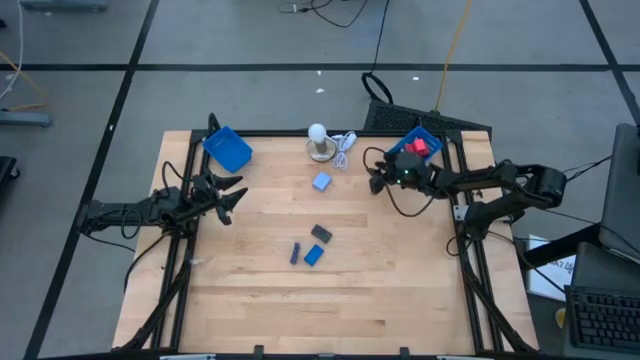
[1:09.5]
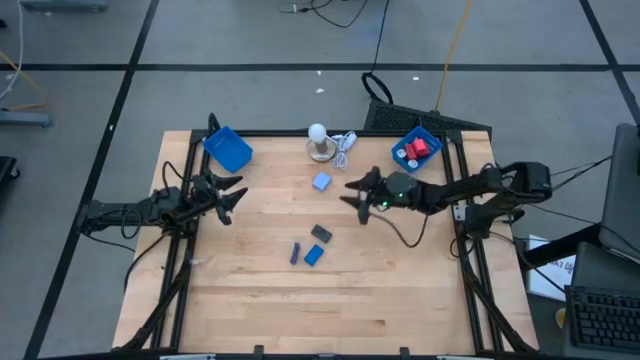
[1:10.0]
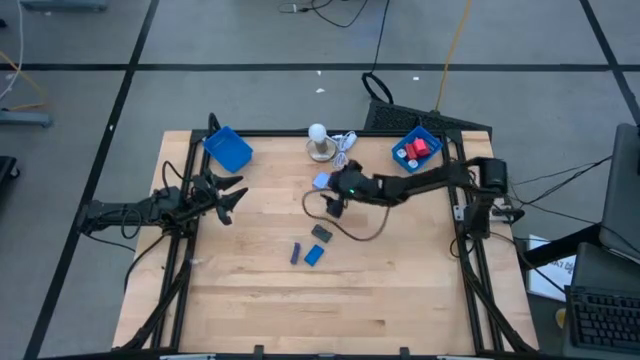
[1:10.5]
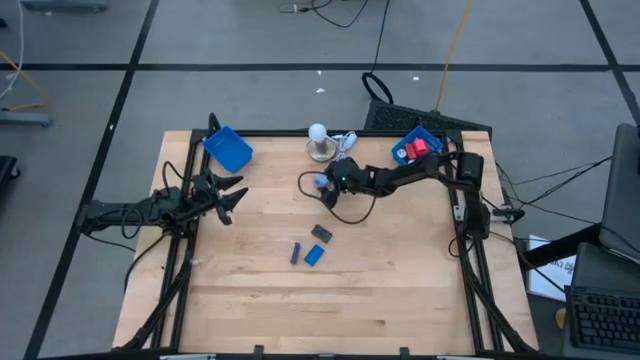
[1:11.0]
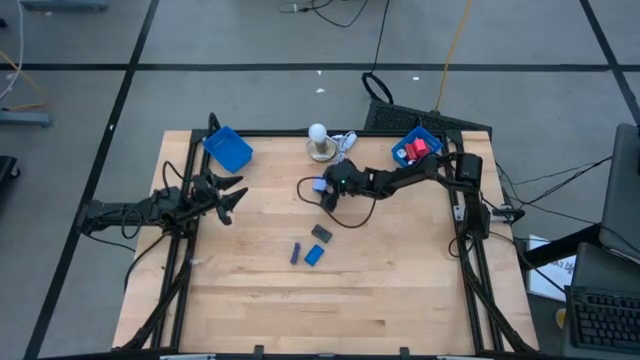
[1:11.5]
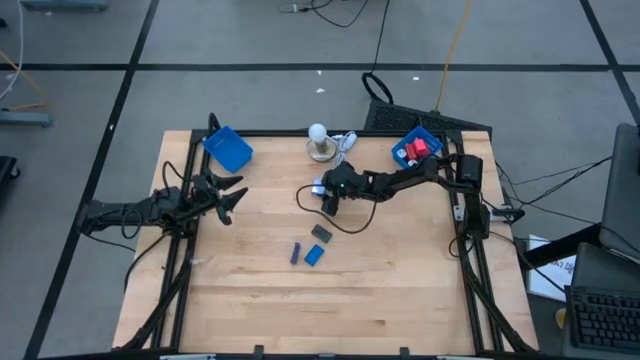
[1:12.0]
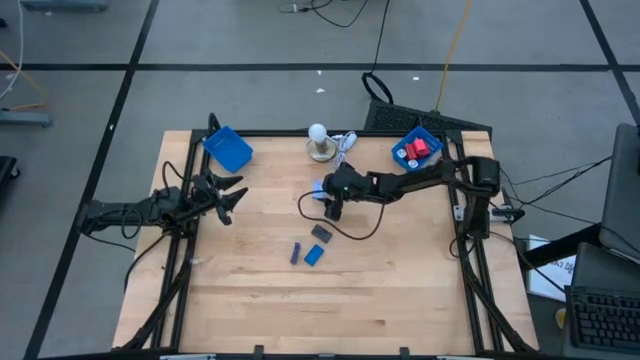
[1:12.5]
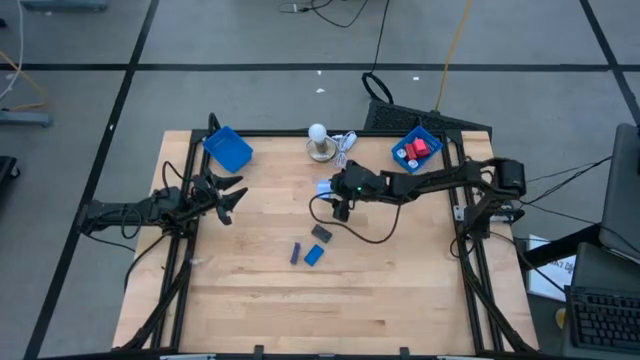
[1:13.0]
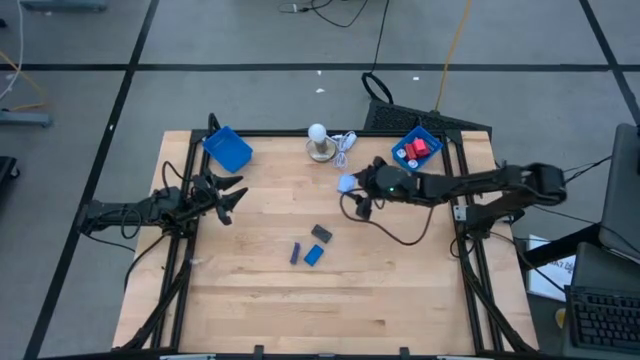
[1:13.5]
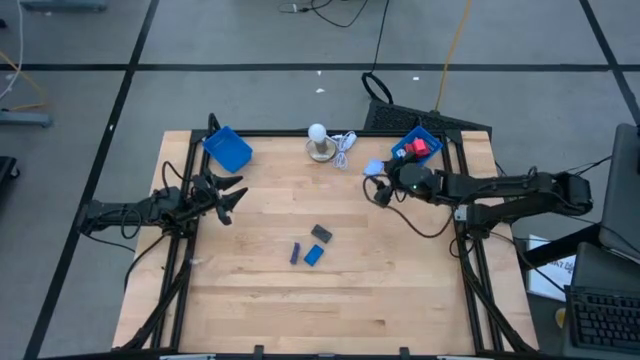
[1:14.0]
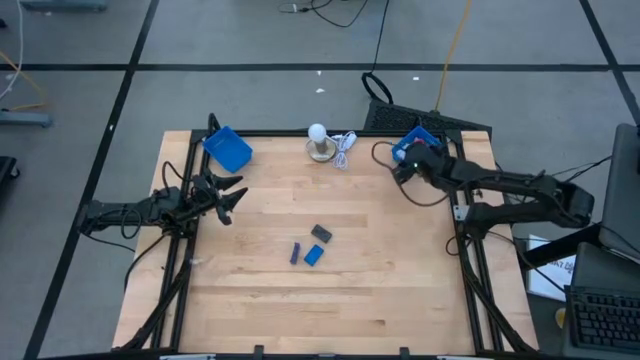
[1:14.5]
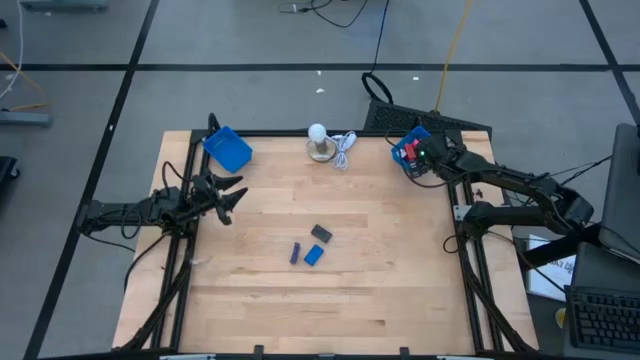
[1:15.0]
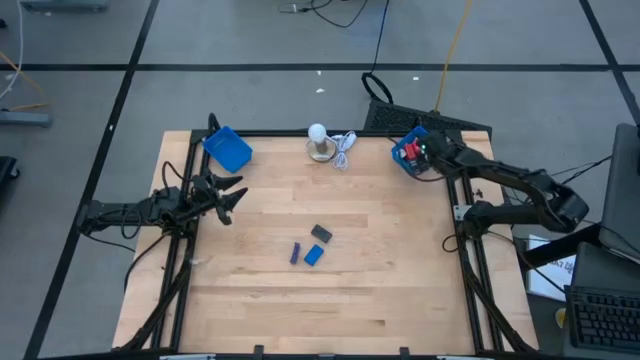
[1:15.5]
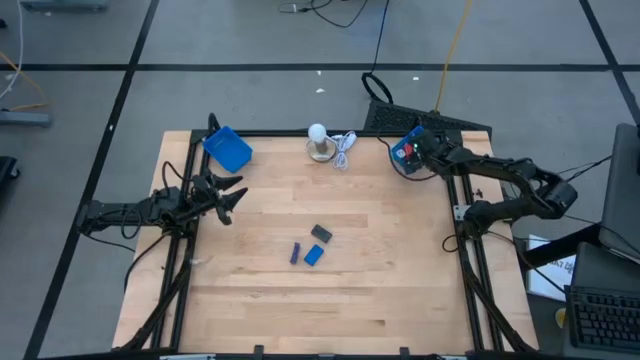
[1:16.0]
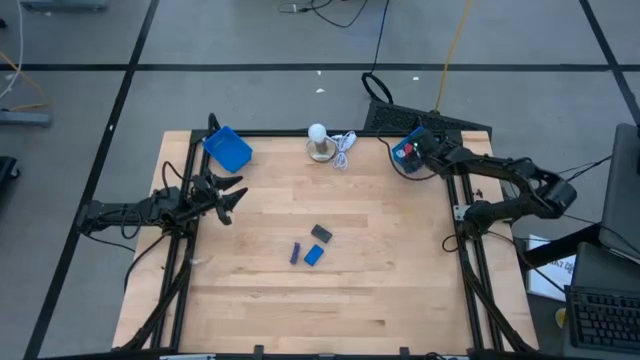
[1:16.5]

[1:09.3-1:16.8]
Task: Pick & Place Office items
Put the white charger adapter into the right blue bin

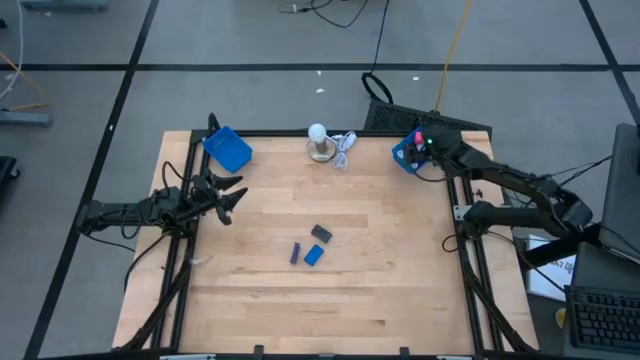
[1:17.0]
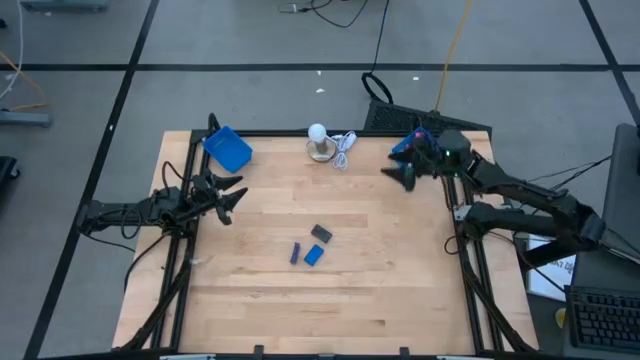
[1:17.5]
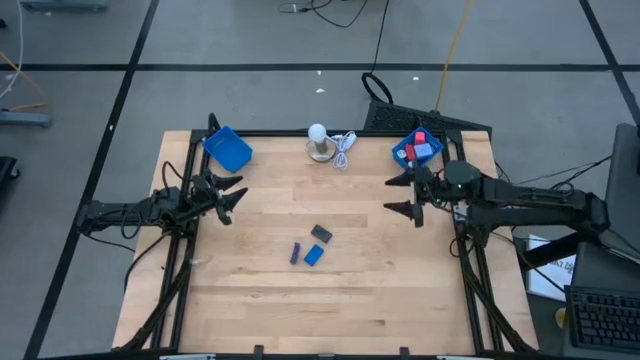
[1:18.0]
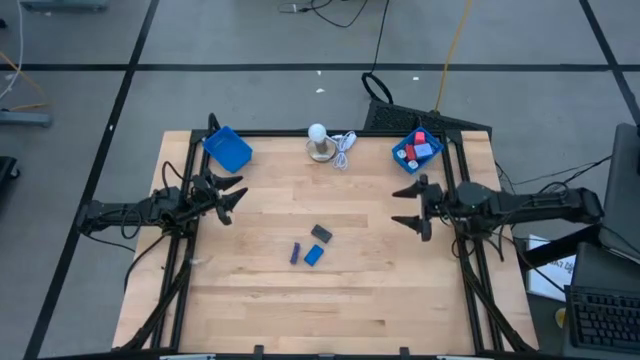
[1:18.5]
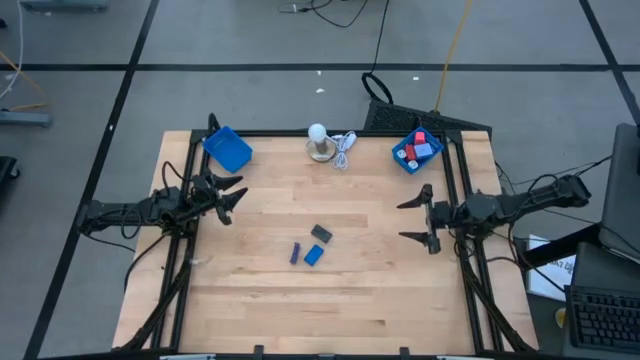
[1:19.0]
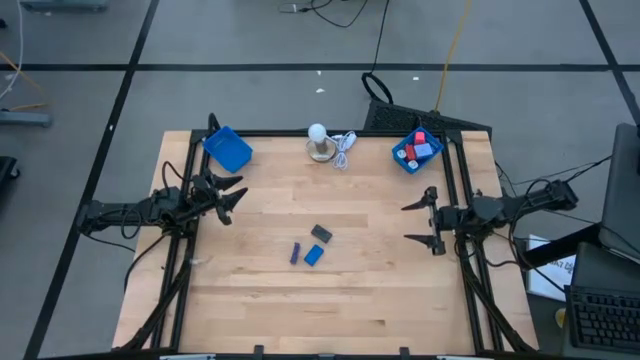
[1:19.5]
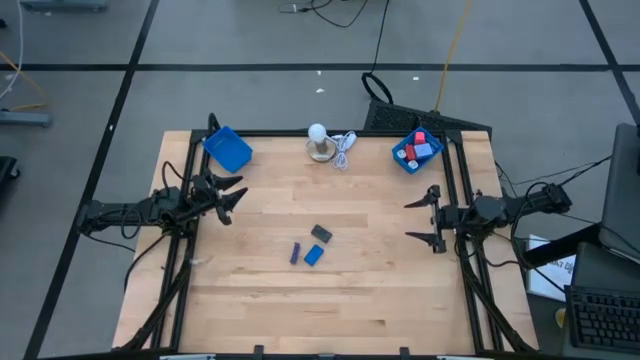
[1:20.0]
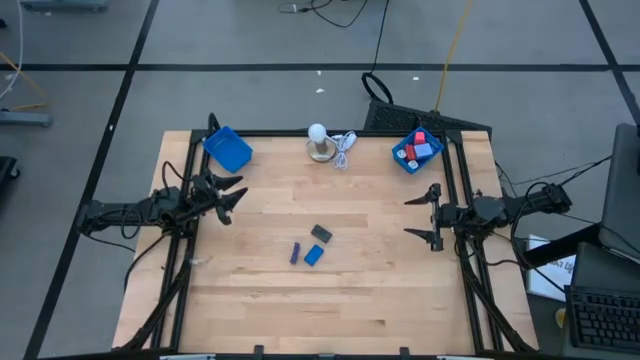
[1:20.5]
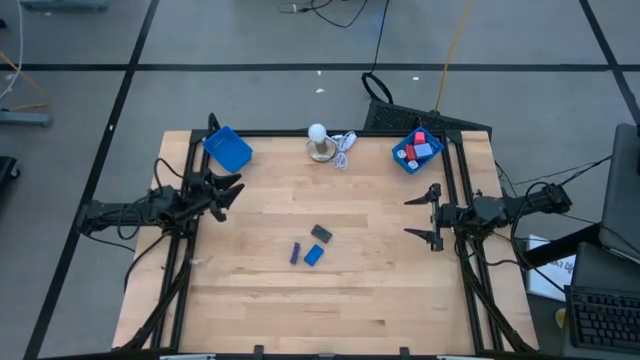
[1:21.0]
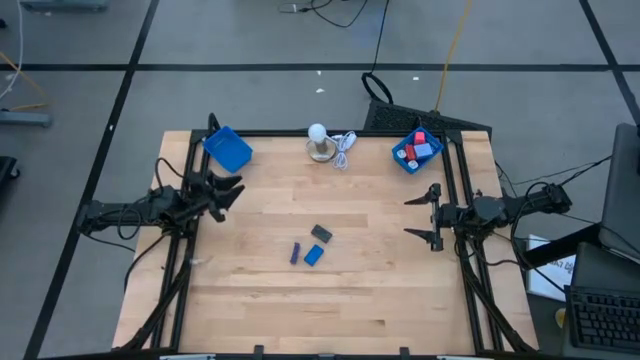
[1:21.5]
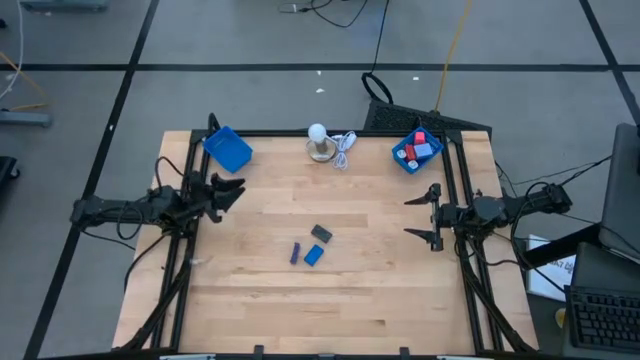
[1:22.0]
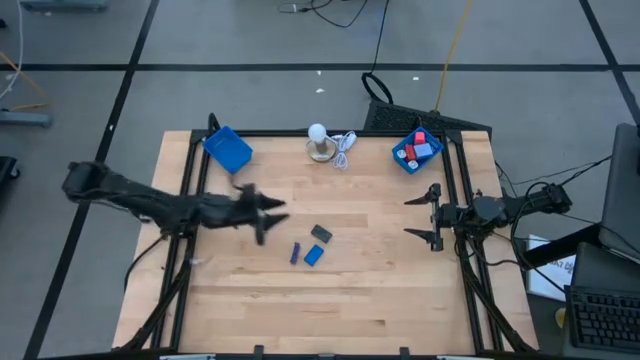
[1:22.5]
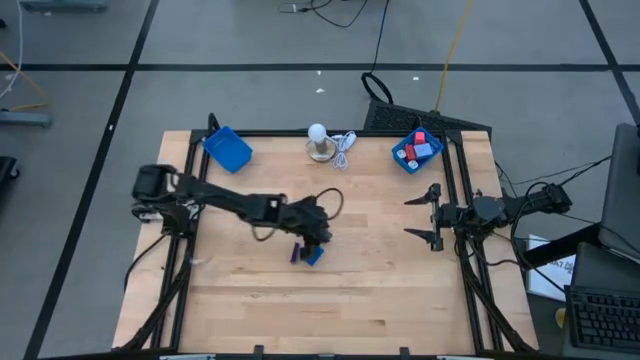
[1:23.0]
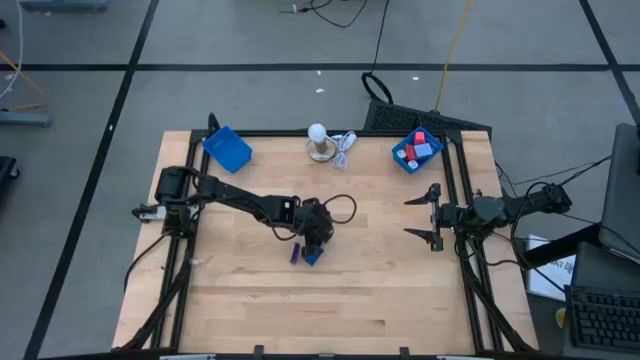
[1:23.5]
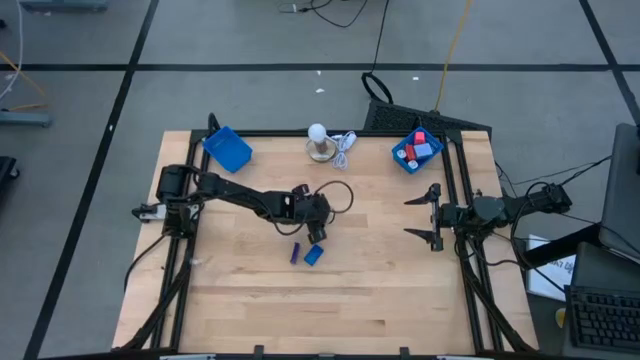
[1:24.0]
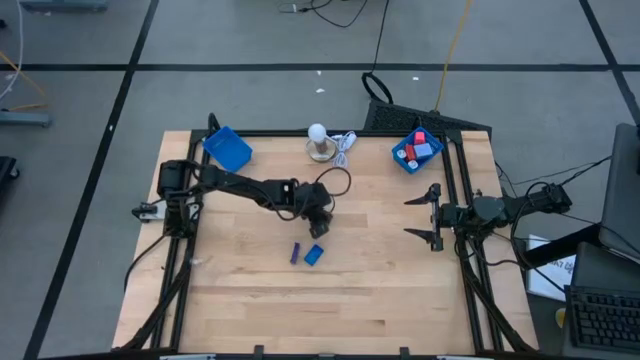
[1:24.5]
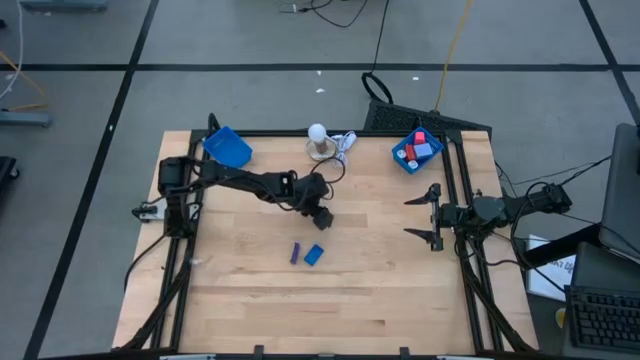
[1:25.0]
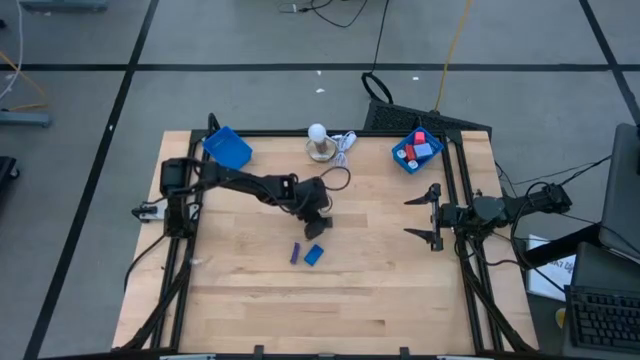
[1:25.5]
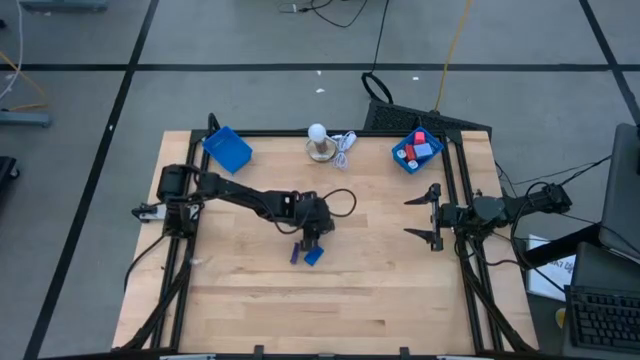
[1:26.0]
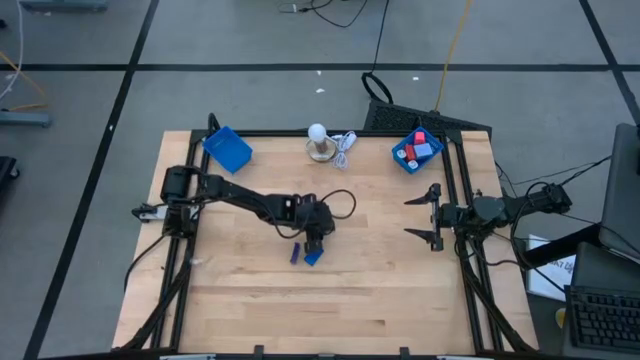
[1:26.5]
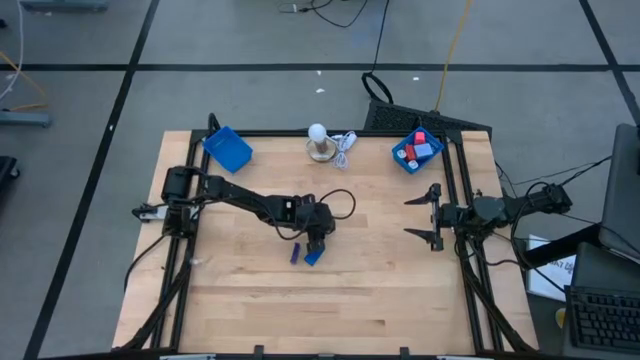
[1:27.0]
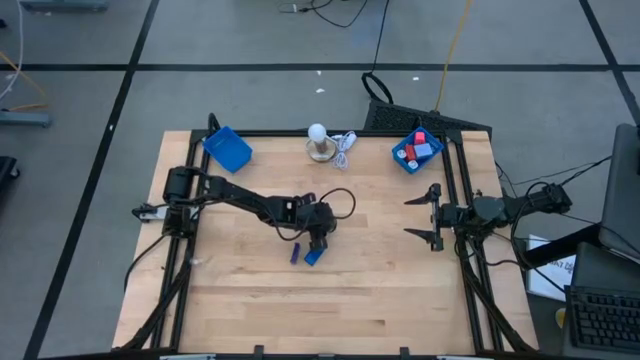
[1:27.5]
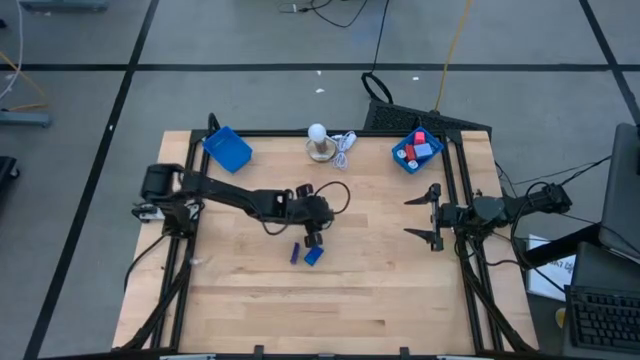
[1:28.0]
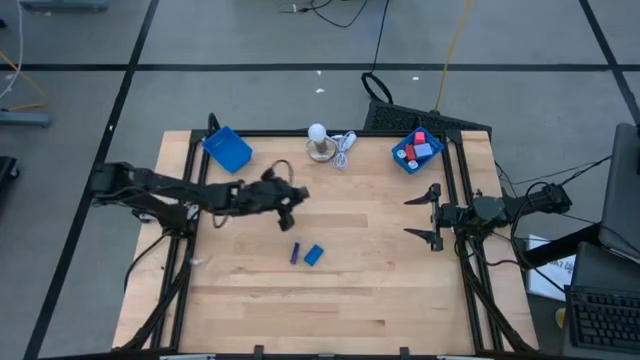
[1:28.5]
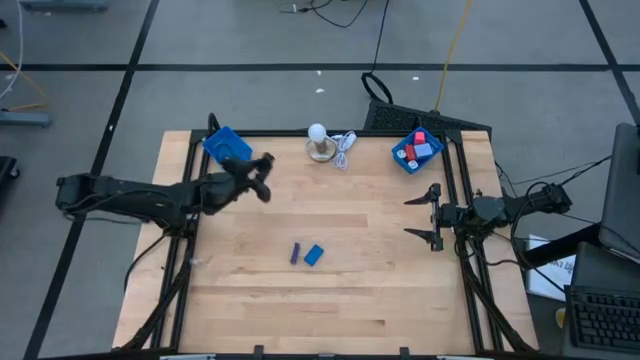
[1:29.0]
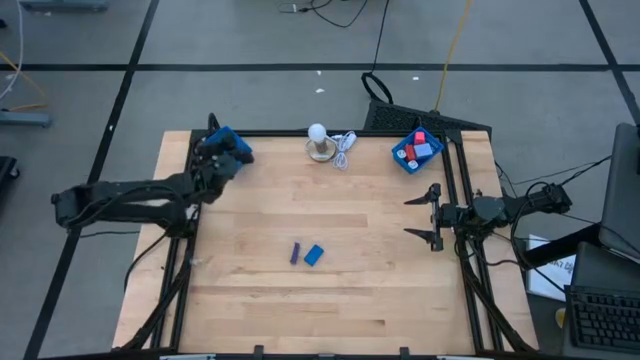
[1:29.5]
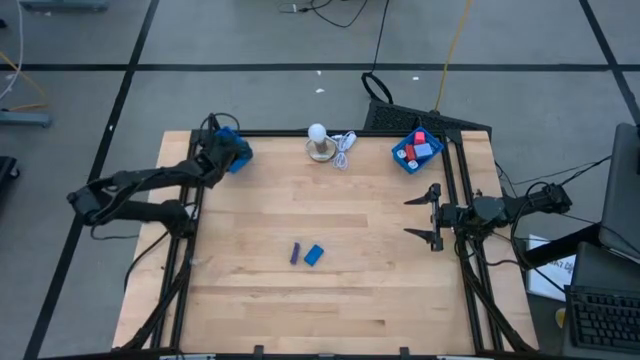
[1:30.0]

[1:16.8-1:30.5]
Put the black digital timer into the left blue bin

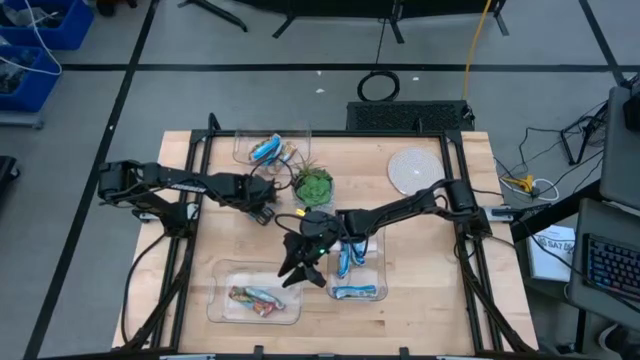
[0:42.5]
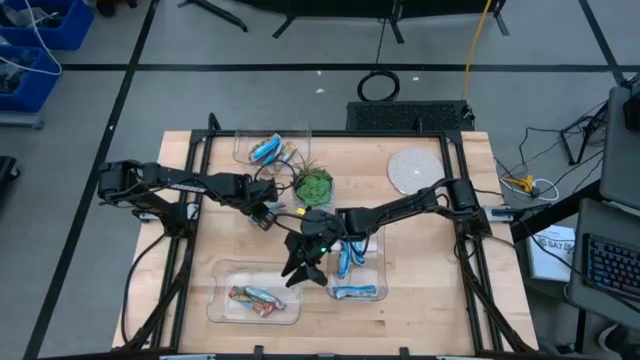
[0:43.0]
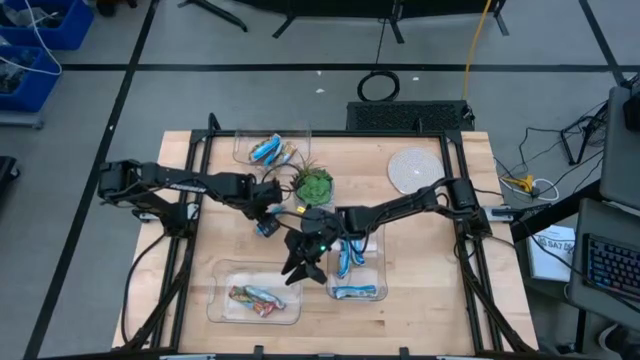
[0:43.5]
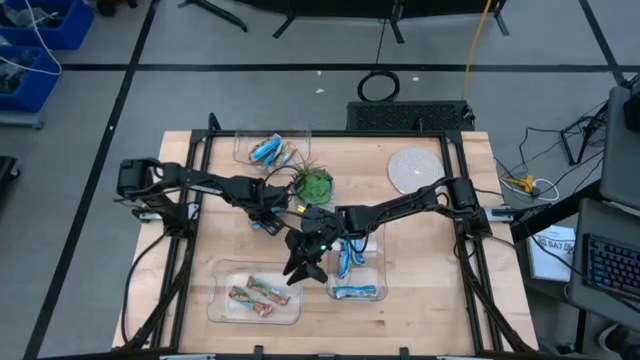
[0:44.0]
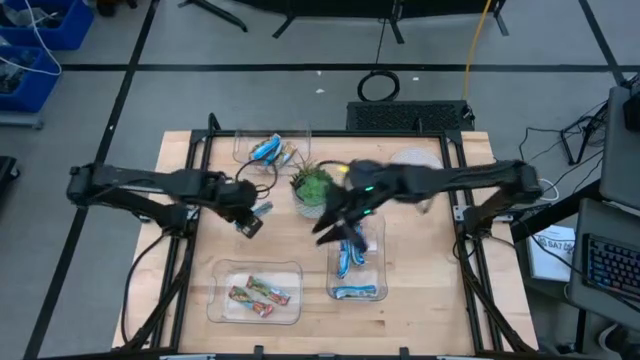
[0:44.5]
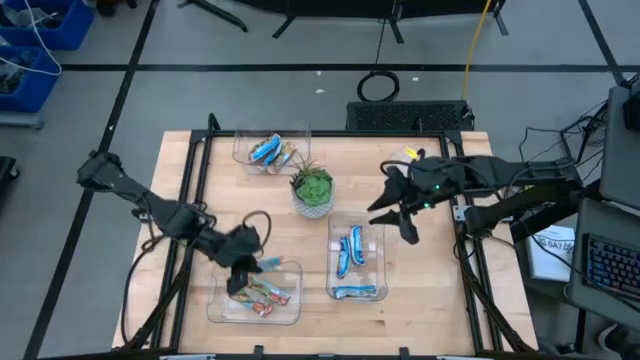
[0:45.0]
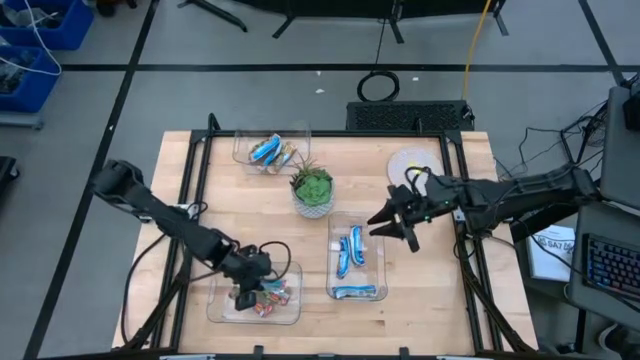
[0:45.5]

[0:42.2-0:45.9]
Task: Pick and place Granola Bars by type
Put the red granola bar into the bottom transparent bin
